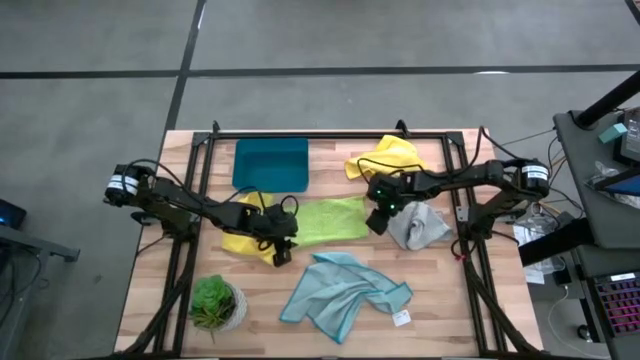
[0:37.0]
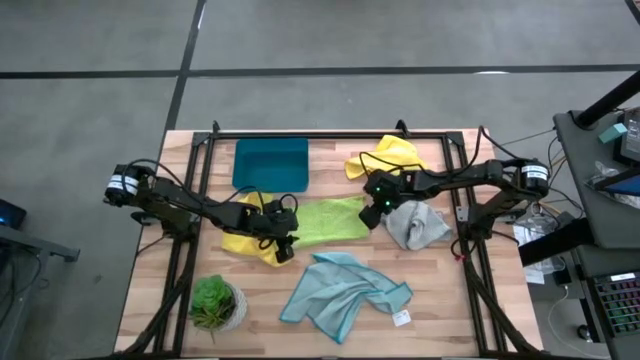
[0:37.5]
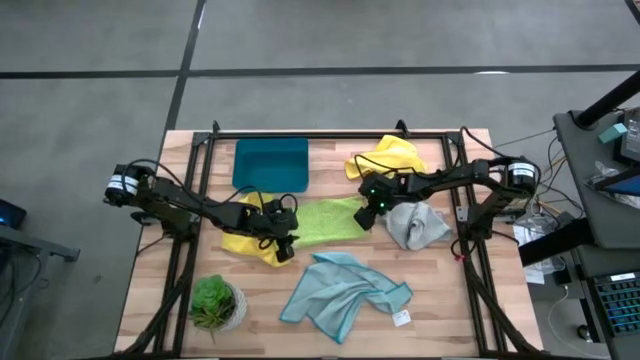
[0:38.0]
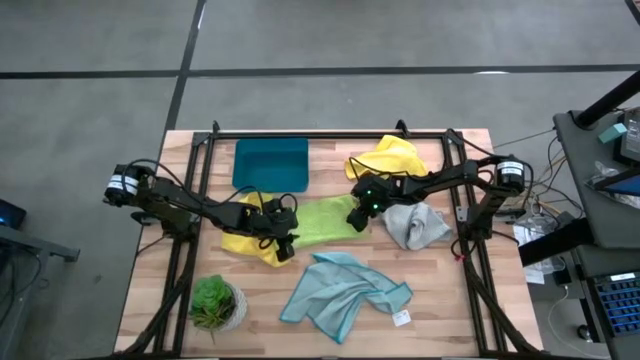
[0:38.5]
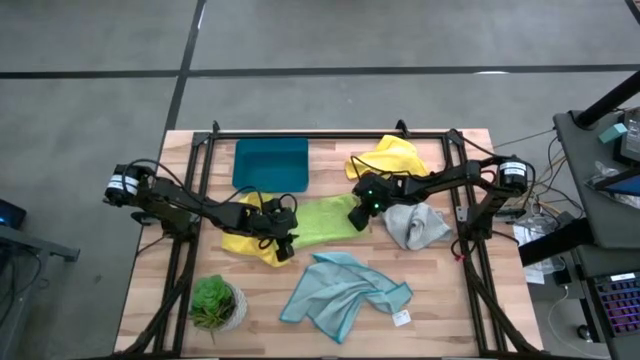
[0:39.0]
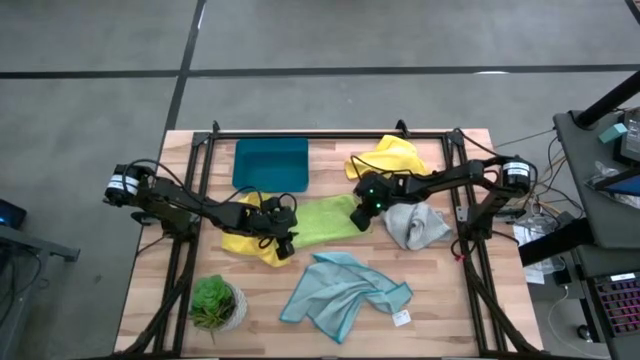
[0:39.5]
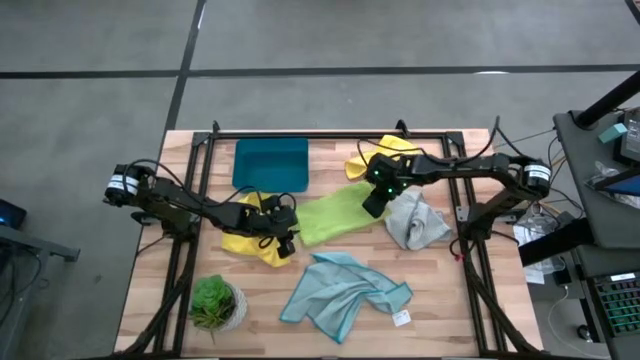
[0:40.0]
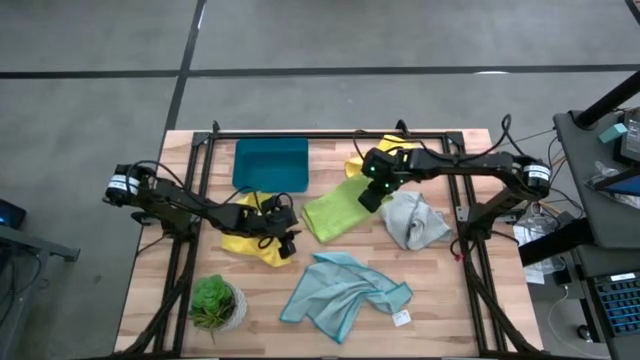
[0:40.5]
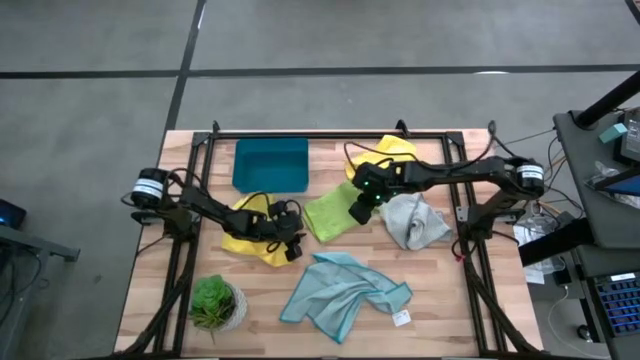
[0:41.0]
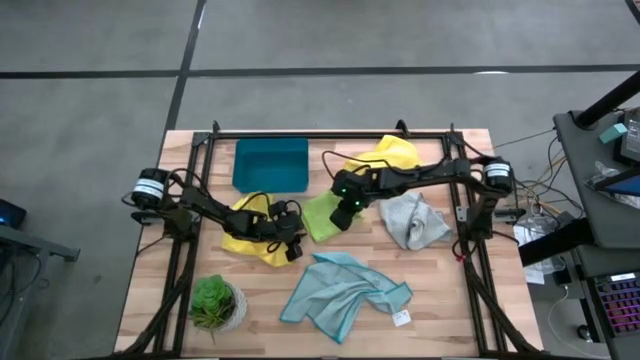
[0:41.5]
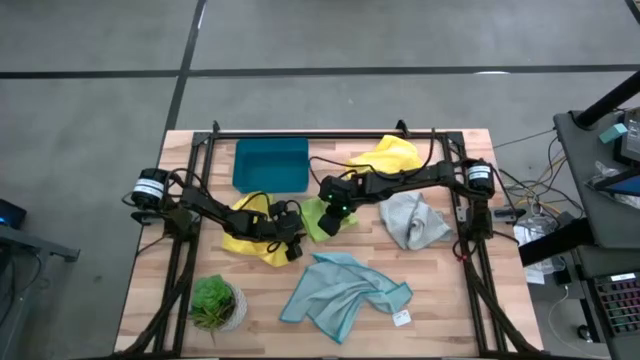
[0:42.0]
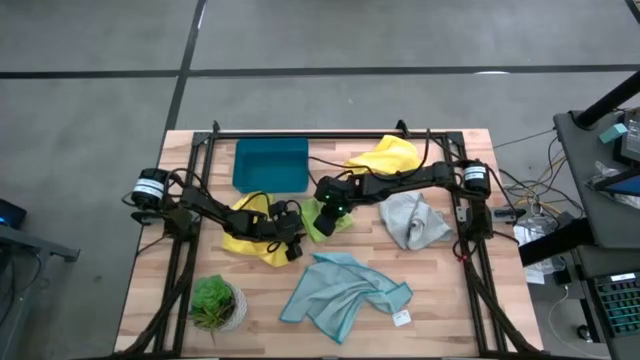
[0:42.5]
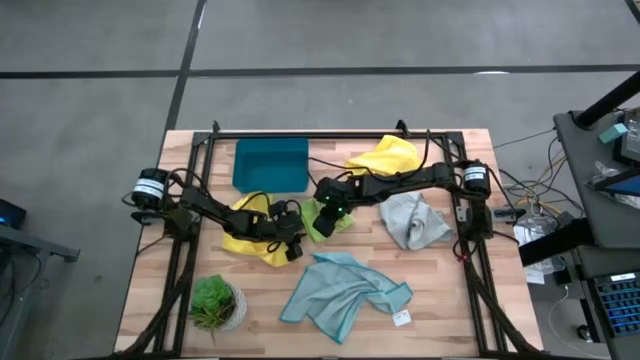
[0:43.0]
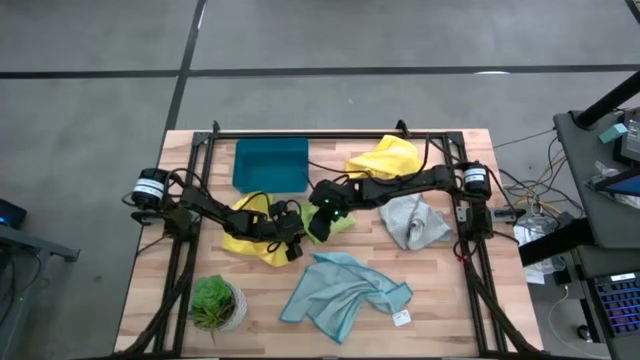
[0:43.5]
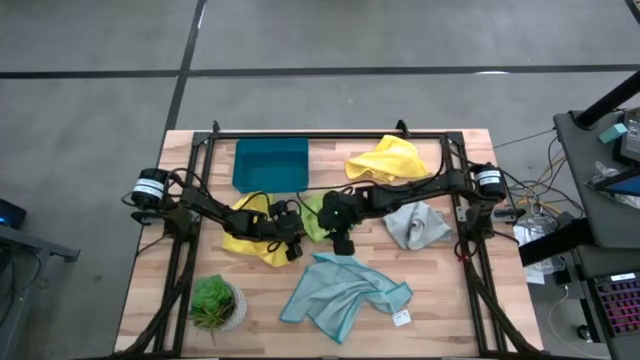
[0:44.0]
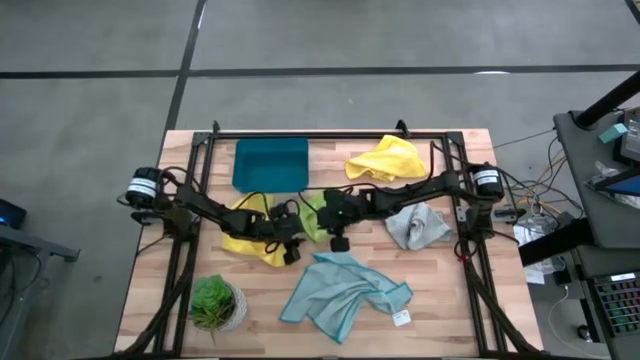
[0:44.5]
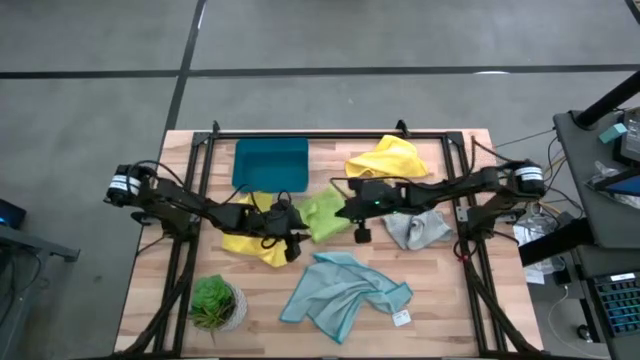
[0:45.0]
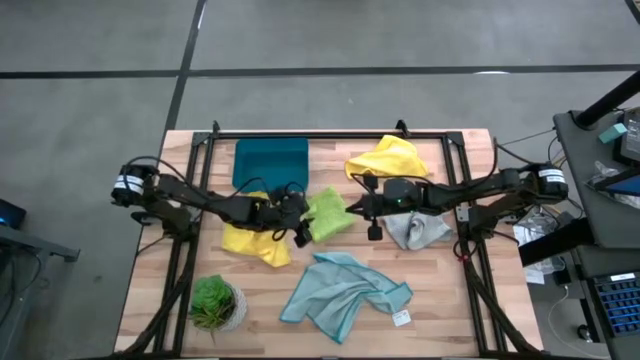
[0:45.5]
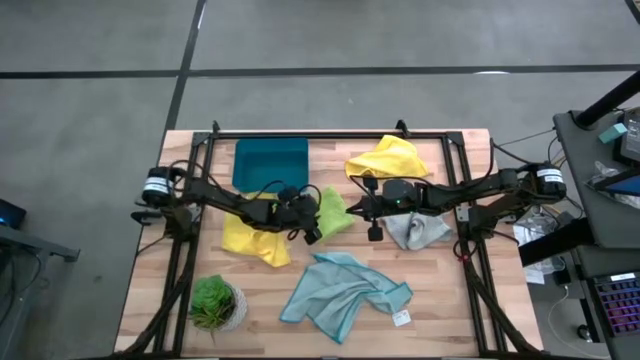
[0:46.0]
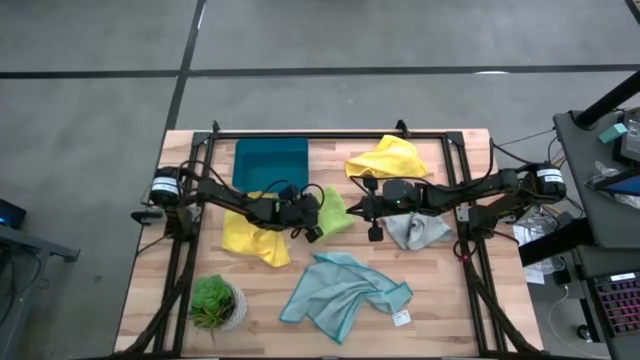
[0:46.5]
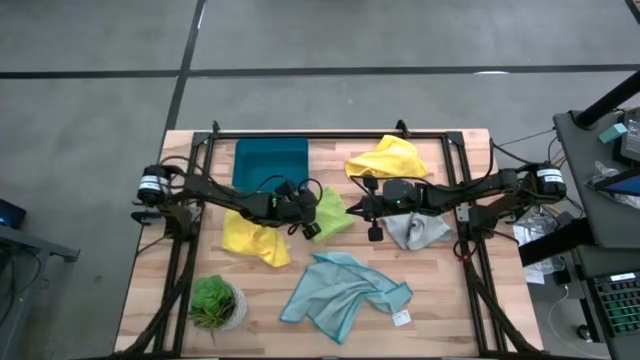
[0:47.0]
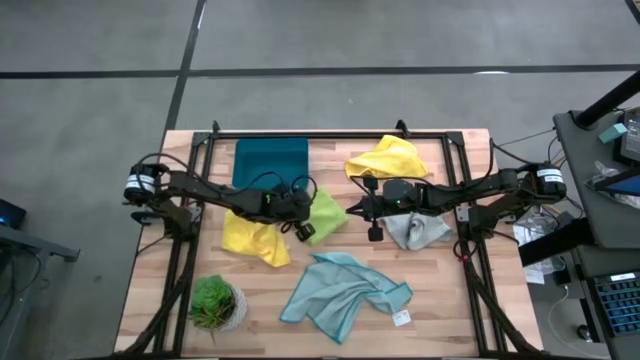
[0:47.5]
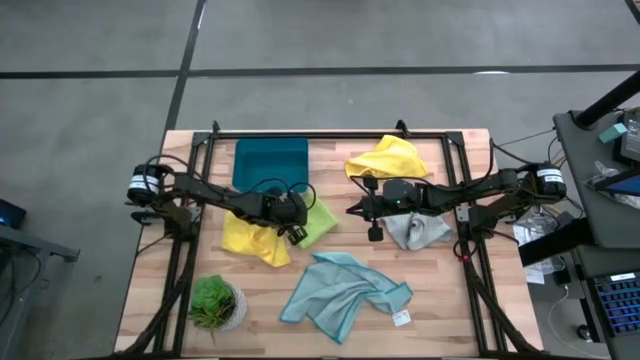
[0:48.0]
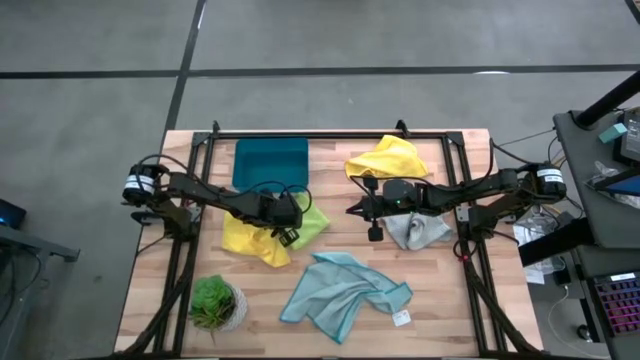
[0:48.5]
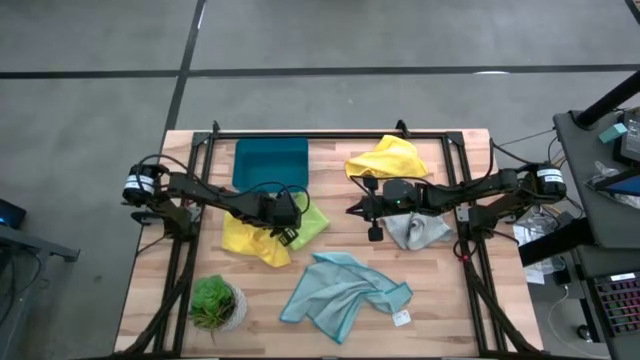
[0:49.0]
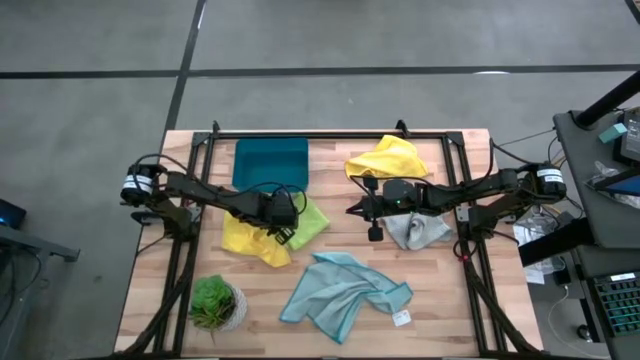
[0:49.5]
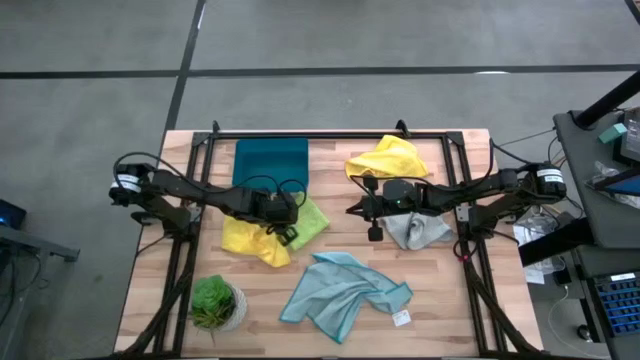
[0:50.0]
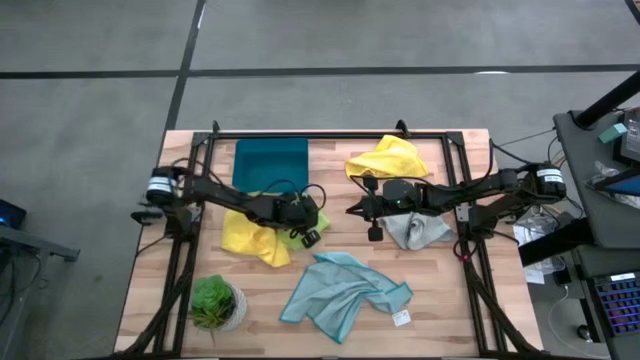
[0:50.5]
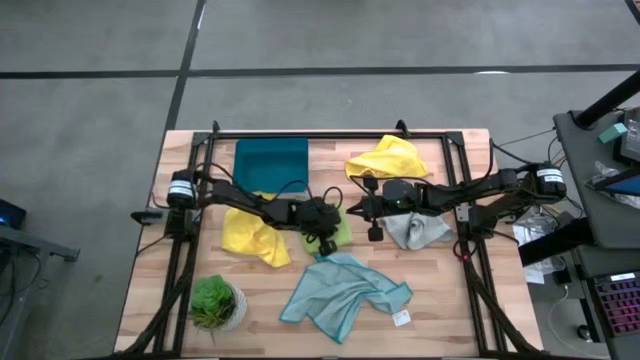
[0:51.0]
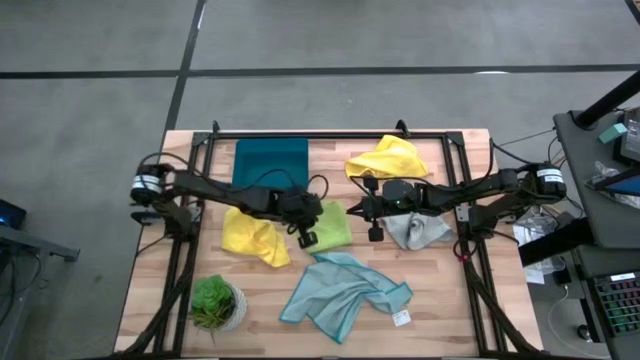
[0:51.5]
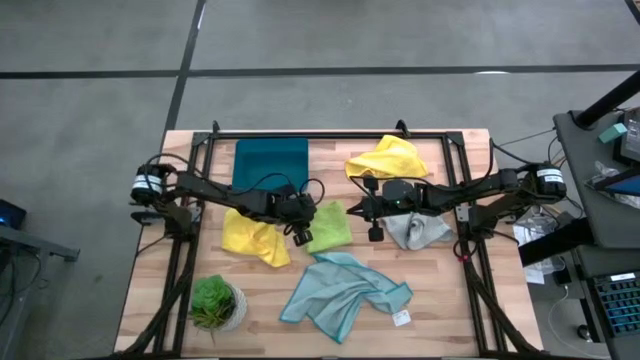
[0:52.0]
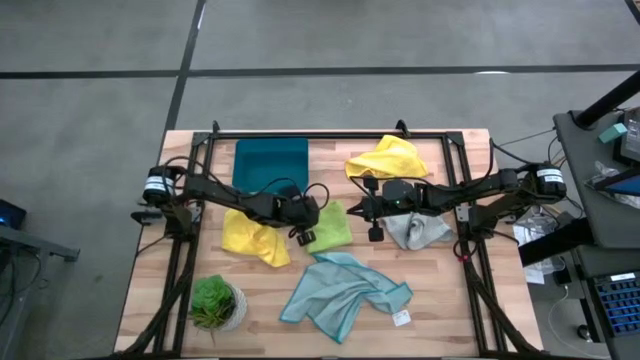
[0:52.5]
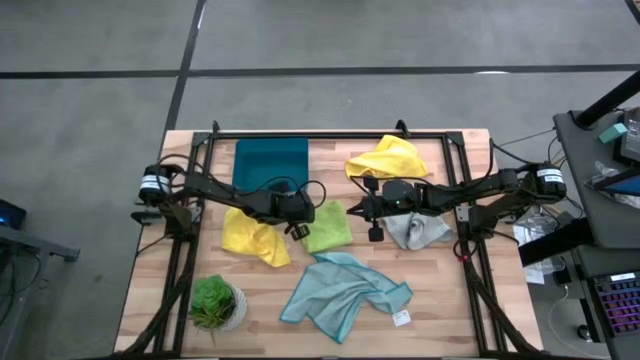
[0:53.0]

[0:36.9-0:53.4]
Task: Fold microfiber towels
Fold the green microfiber towel
